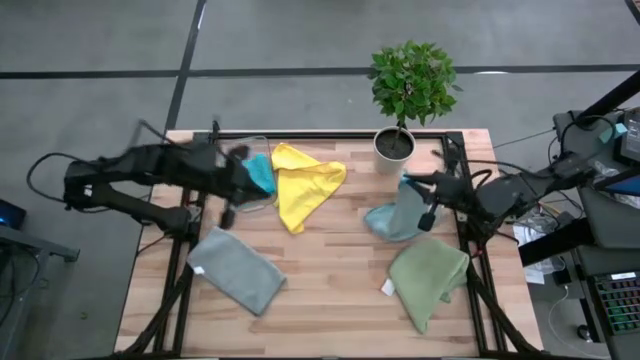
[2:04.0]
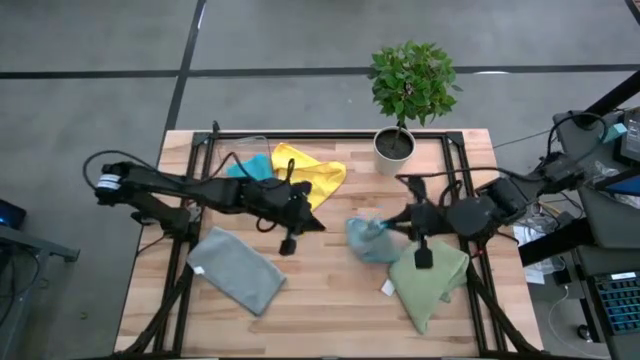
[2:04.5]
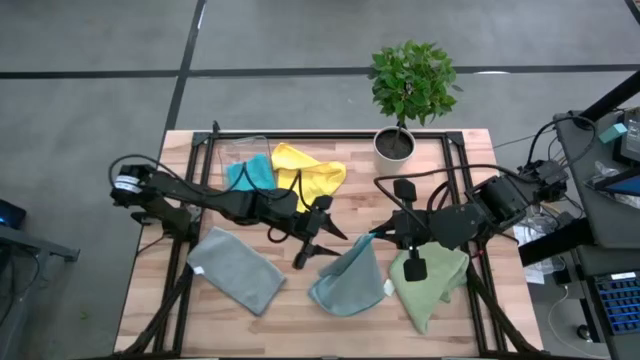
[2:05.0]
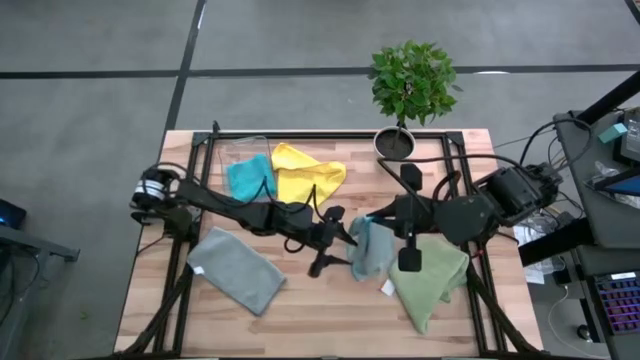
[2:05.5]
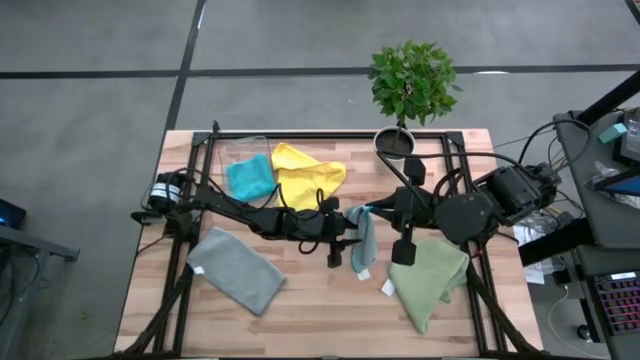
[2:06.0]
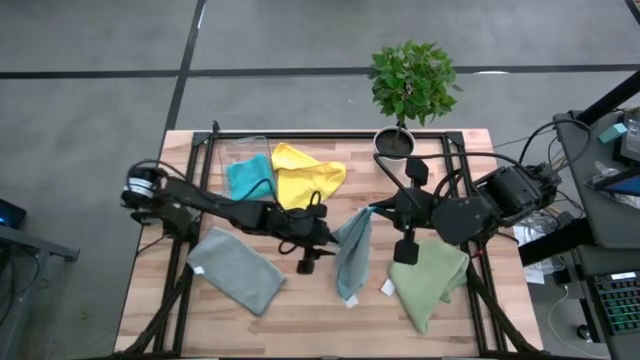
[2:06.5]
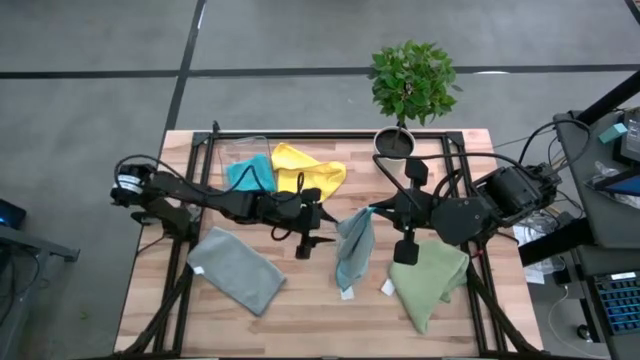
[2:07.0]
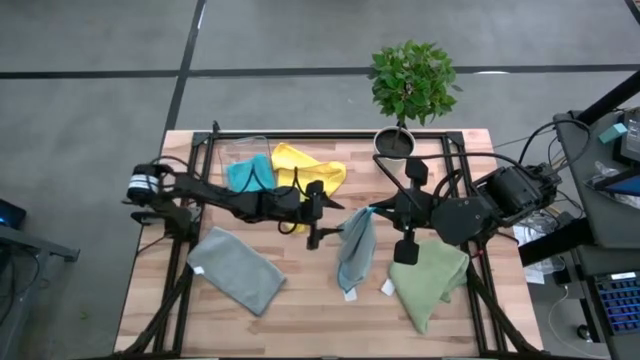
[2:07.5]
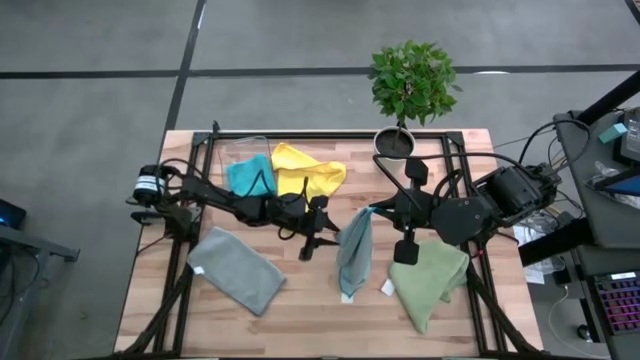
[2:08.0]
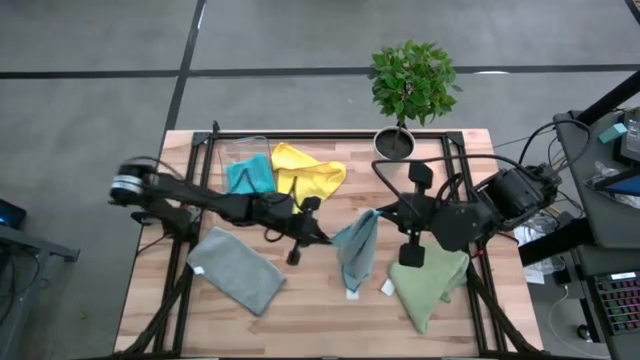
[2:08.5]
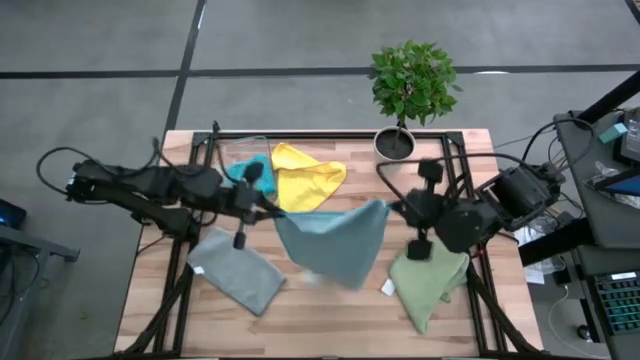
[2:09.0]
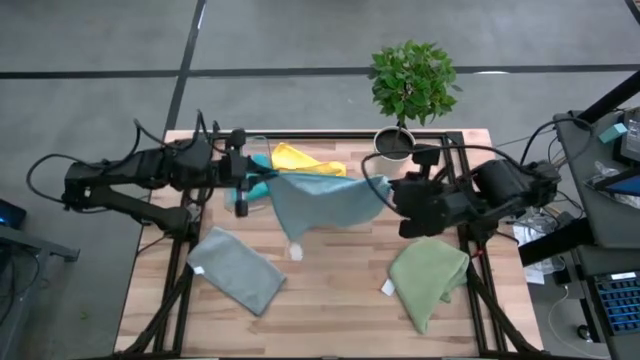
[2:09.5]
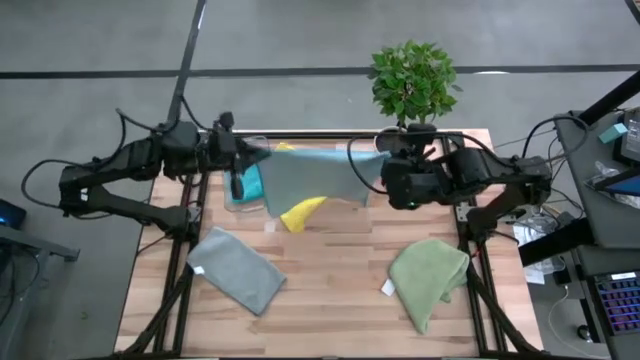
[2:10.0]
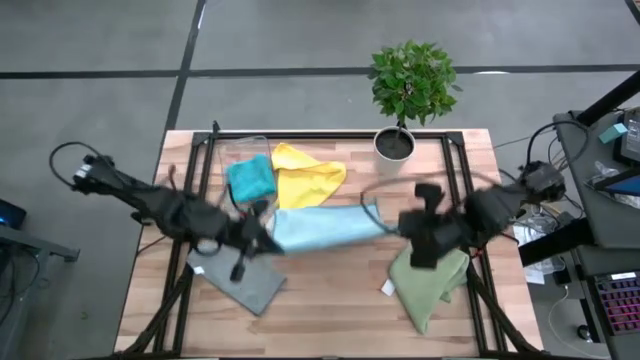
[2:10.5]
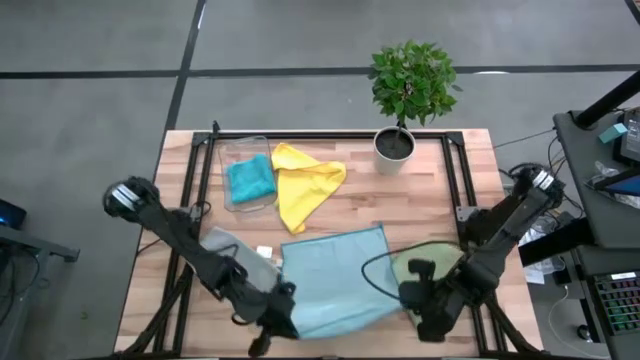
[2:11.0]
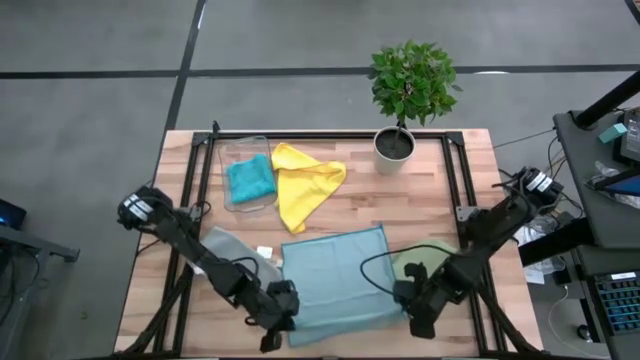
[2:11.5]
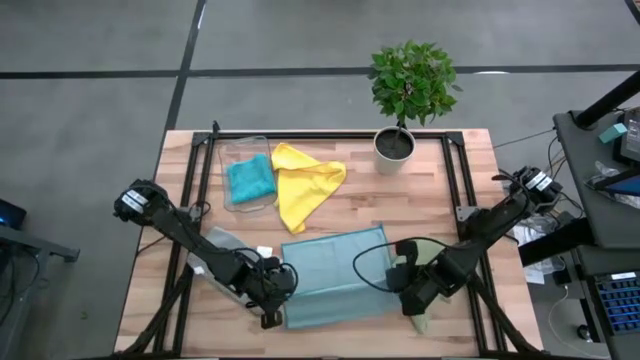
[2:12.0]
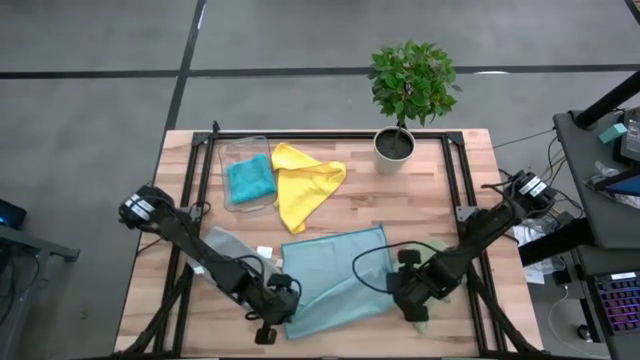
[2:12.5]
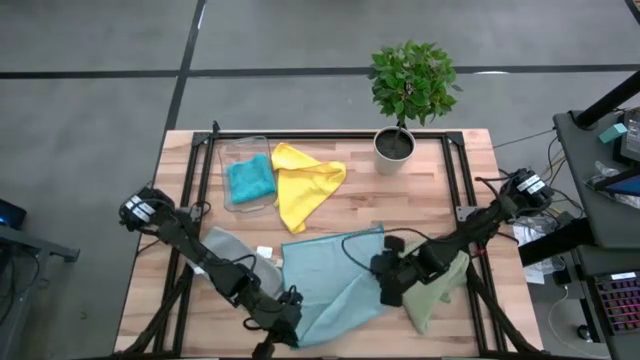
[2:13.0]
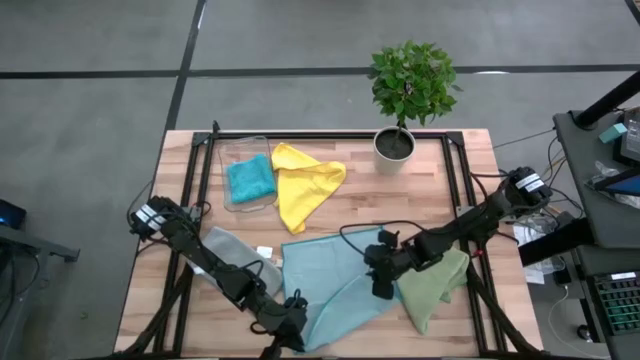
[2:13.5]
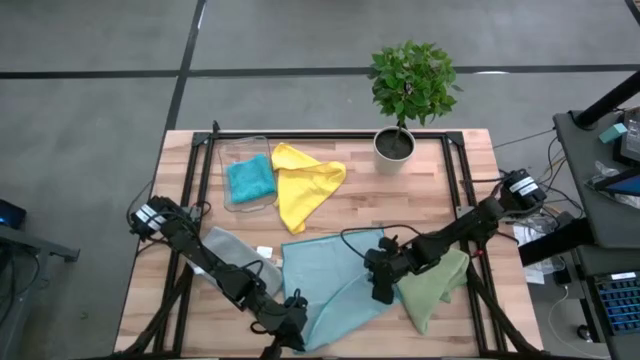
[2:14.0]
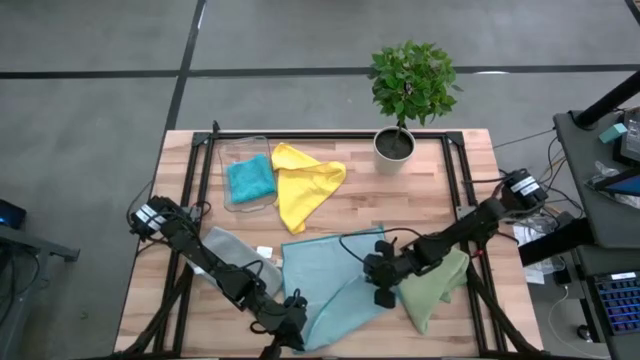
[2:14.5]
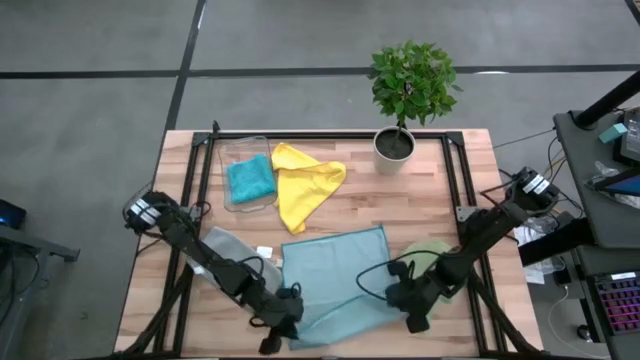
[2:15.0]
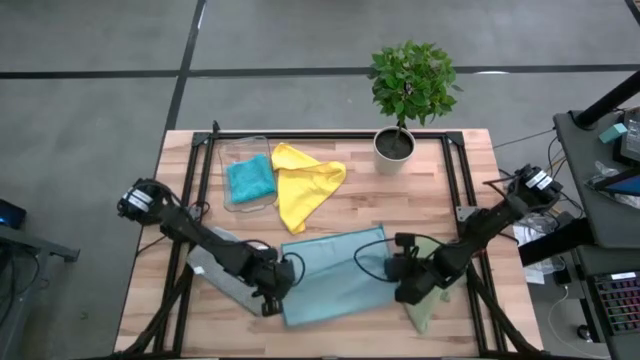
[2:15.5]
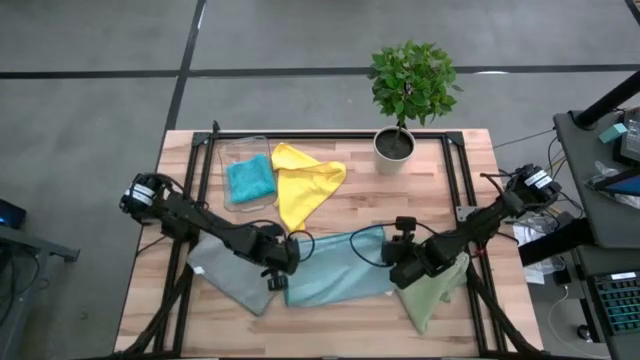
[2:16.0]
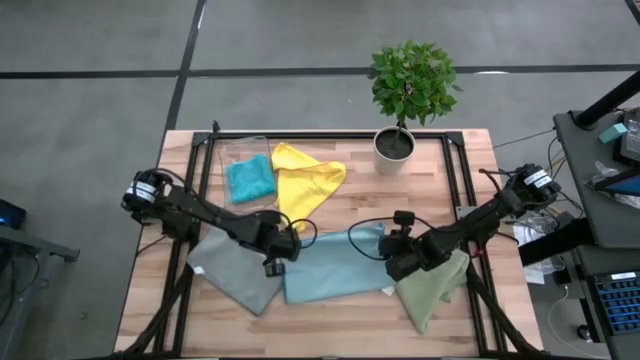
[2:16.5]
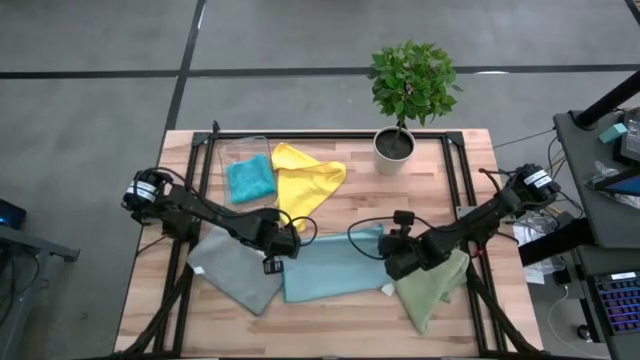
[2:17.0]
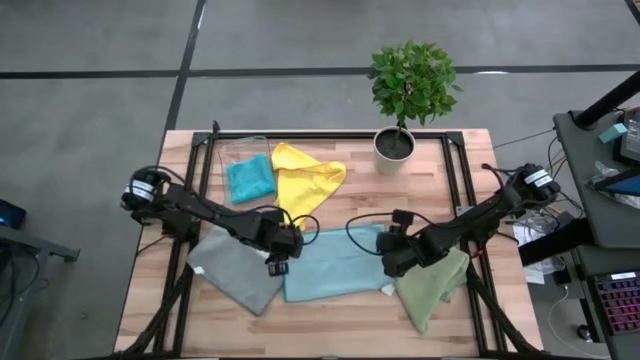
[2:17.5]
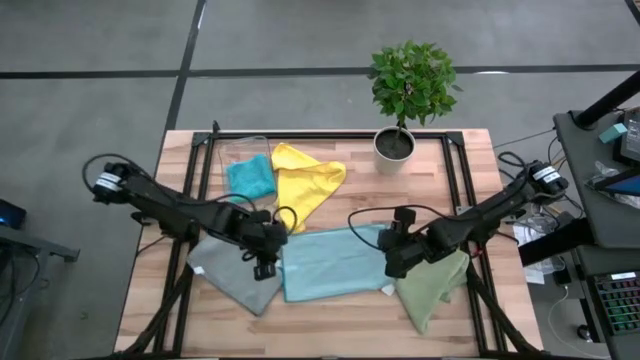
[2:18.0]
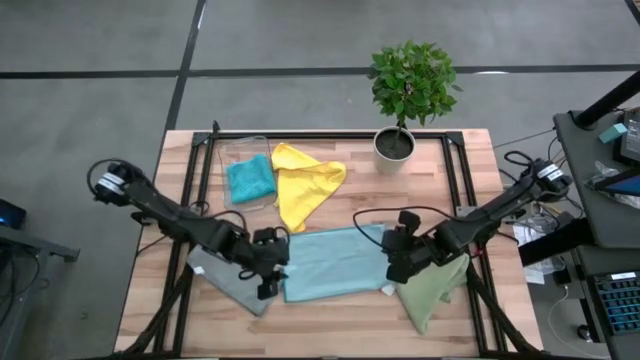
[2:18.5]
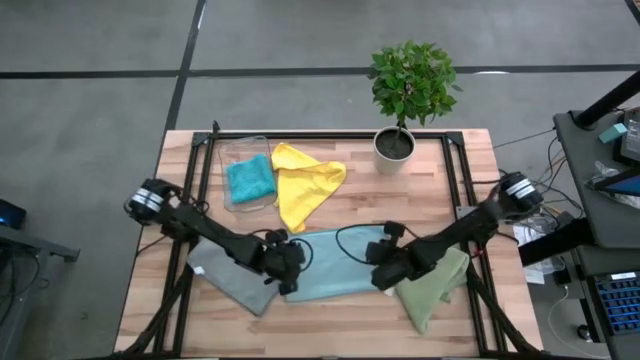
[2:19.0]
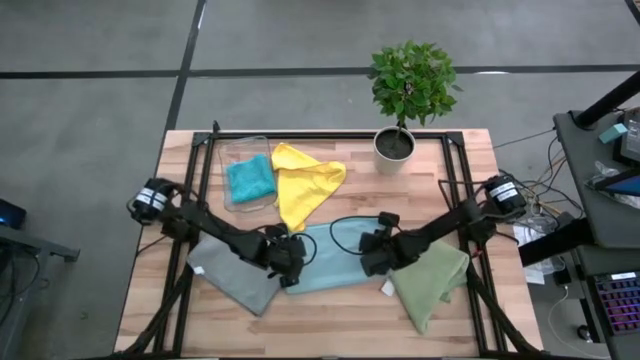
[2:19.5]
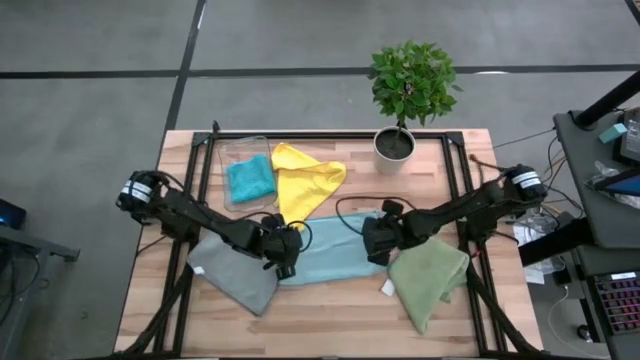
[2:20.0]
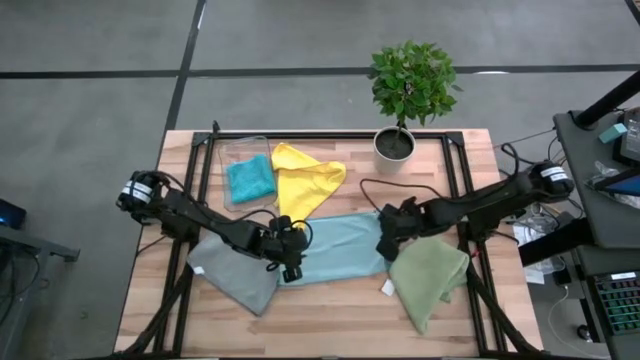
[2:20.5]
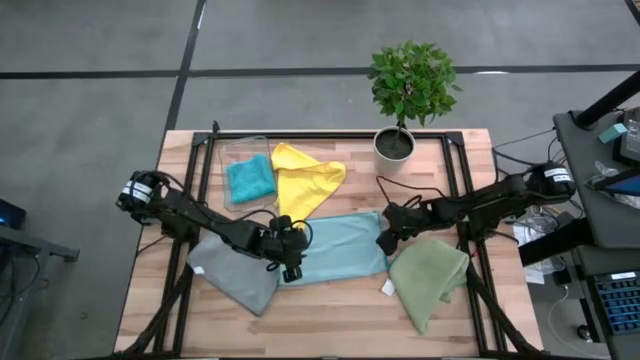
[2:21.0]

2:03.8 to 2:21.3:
Task: Fold microfiber towels
Fold the light blue microfiber towel

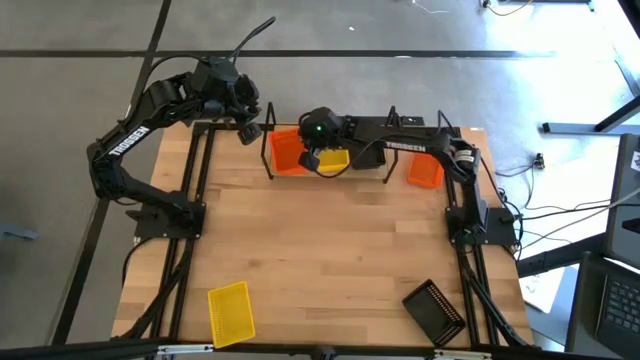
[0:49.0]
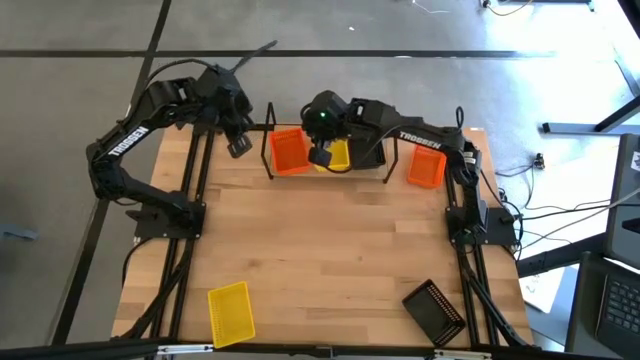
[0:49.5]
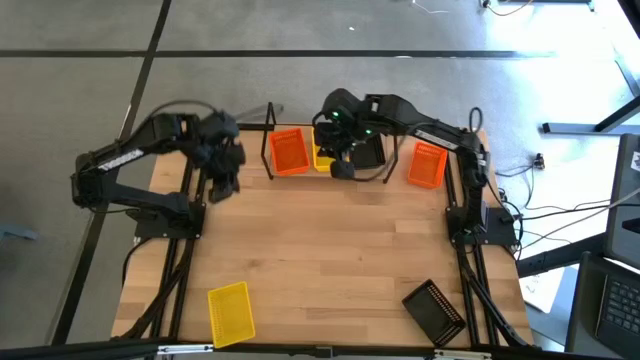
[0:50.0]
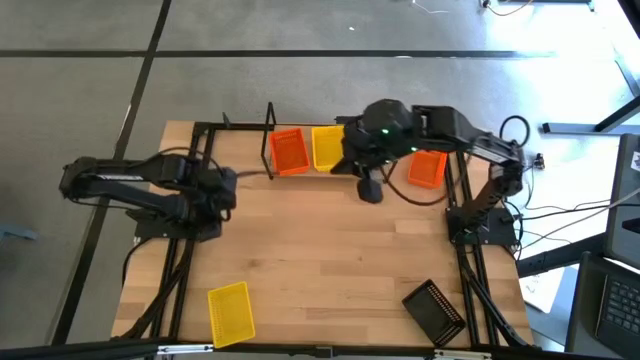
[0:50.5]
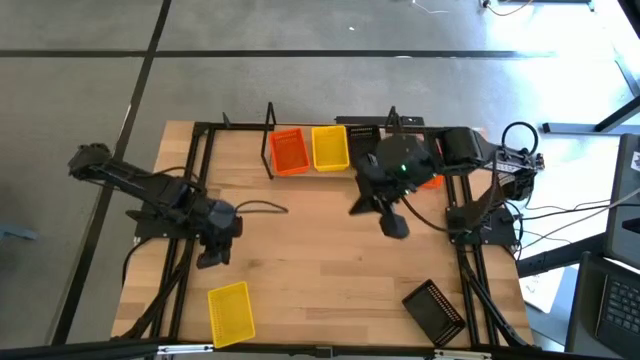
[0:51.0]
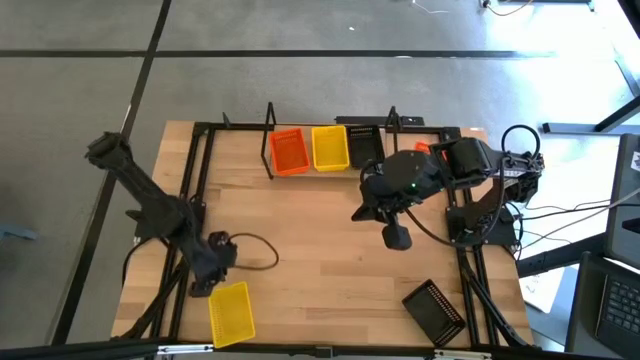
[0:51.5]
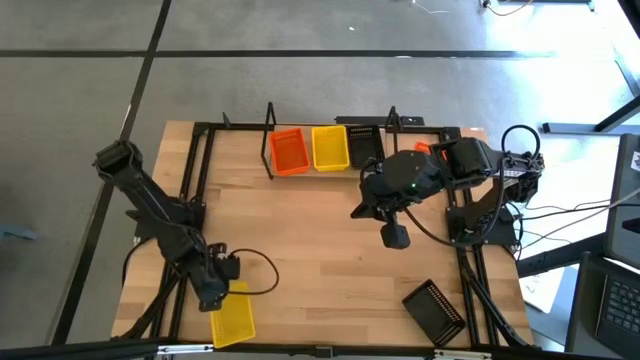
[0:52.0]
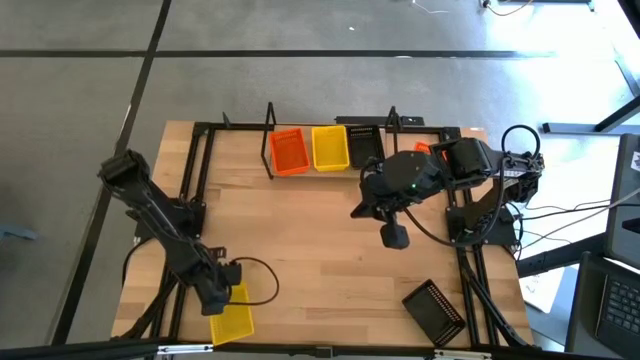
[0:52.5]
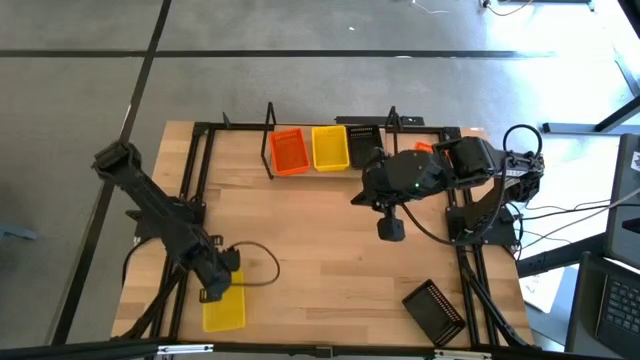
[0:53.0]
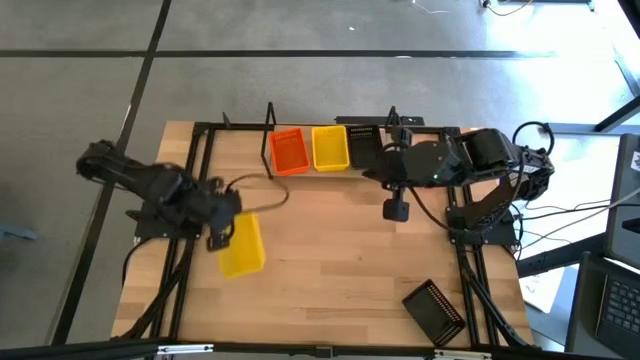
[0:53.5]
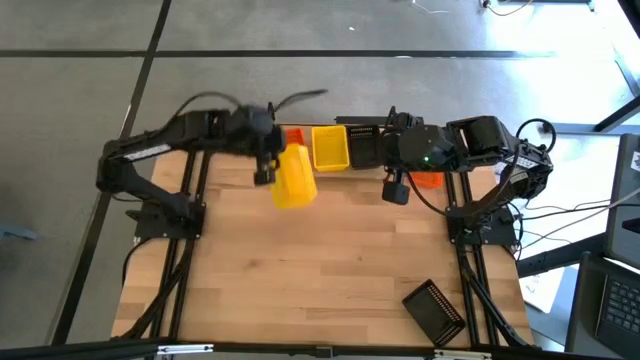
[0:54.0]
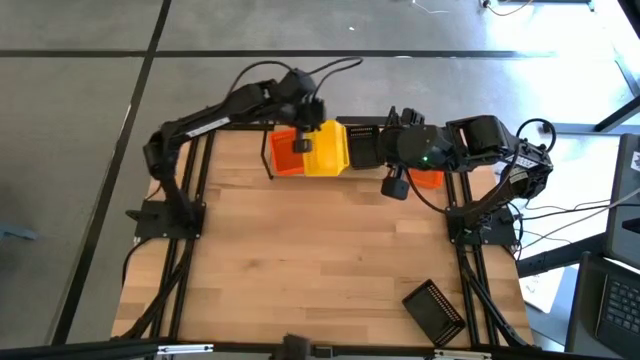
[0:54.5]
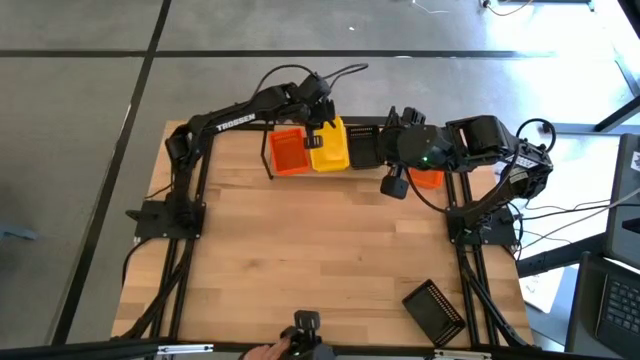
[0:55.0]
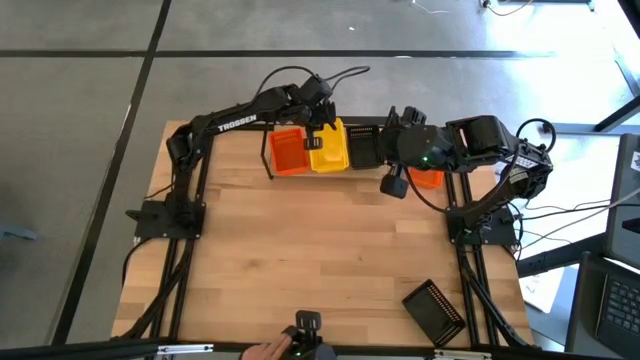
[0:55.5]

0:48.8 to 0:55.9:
Task: Stack baskets on shelf by color
Stack the yellow bin on the stacked bins on the shelf
